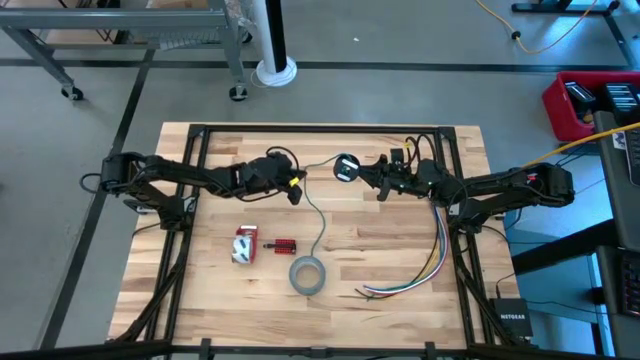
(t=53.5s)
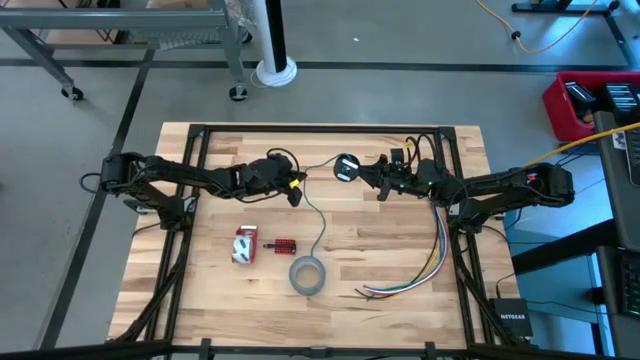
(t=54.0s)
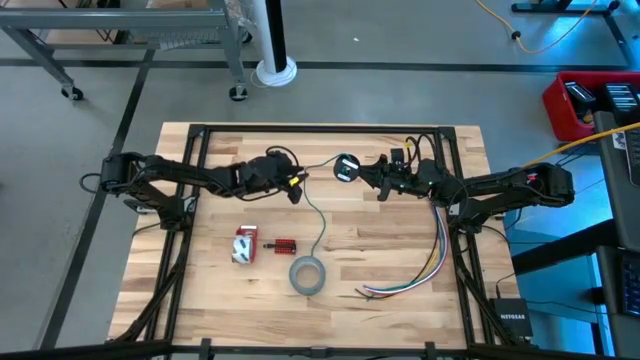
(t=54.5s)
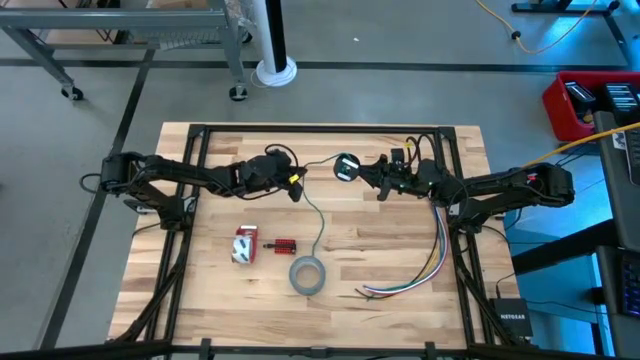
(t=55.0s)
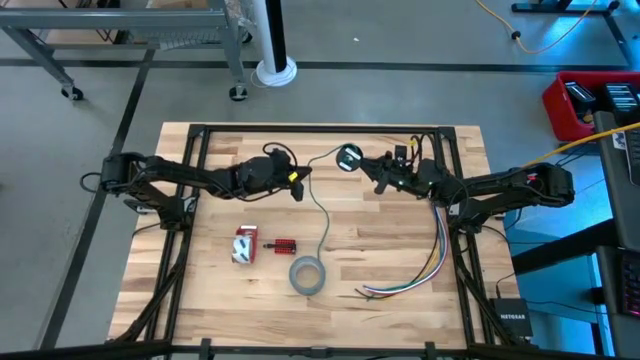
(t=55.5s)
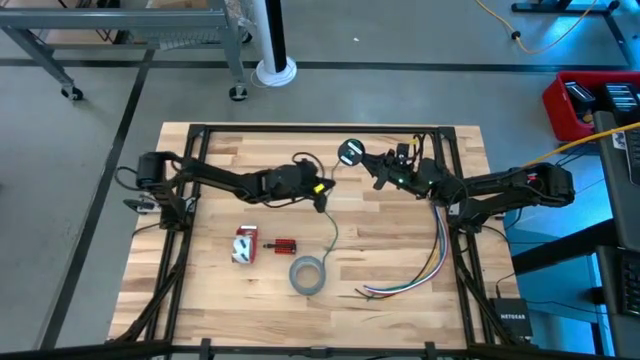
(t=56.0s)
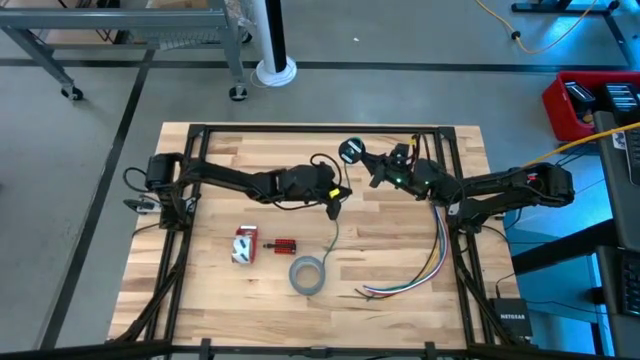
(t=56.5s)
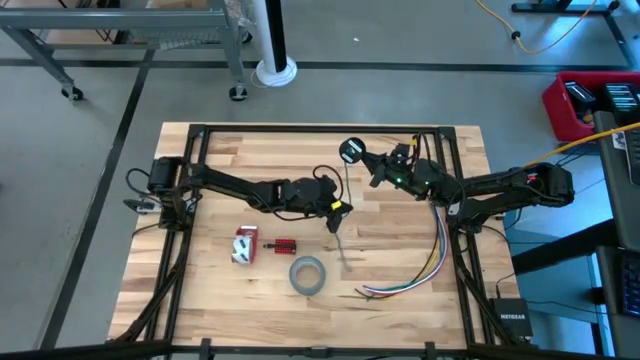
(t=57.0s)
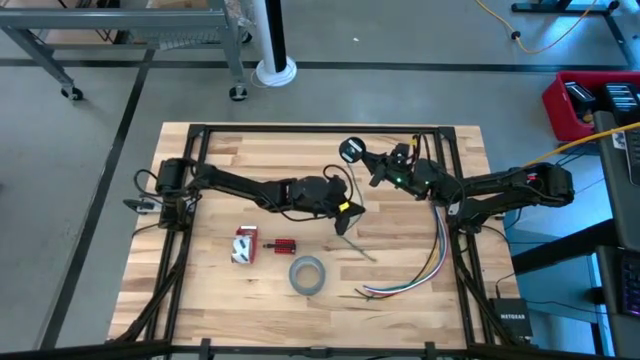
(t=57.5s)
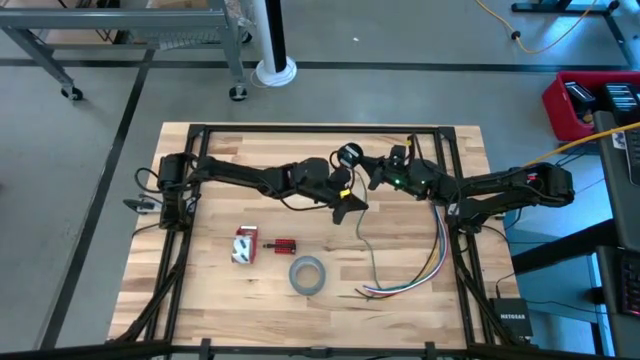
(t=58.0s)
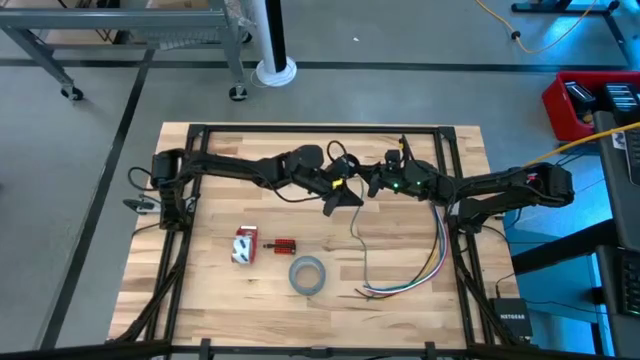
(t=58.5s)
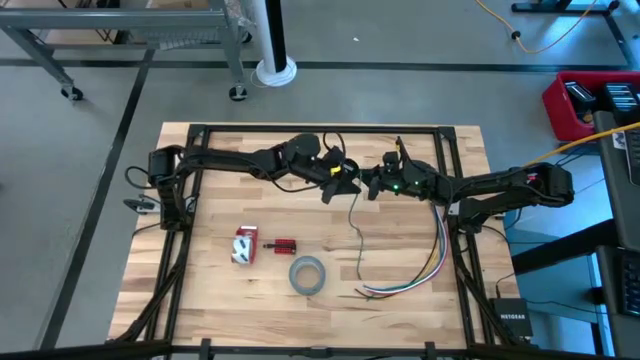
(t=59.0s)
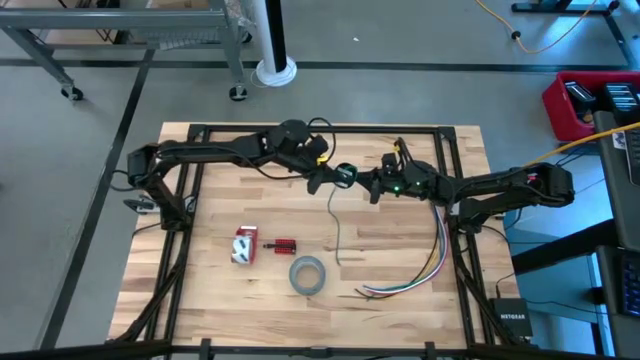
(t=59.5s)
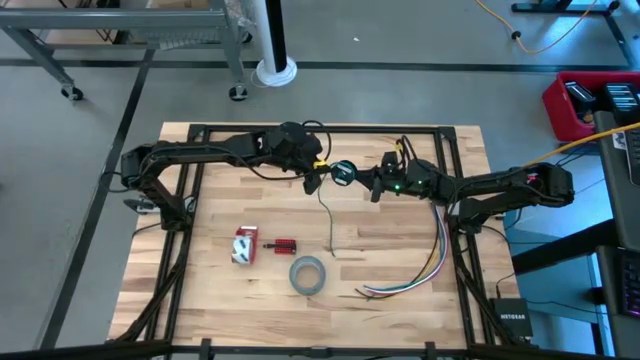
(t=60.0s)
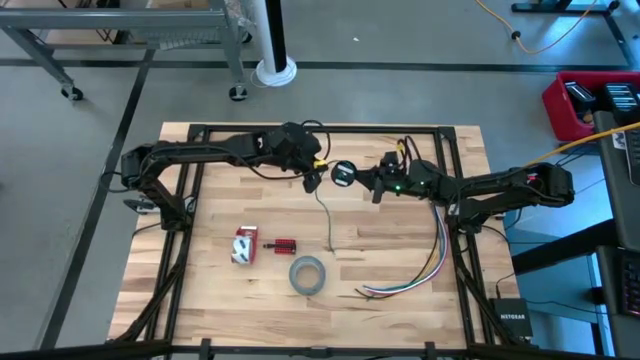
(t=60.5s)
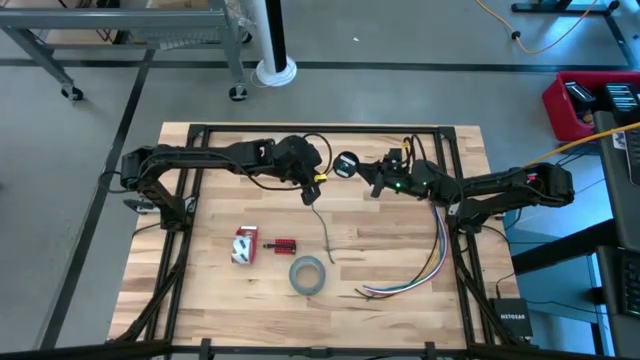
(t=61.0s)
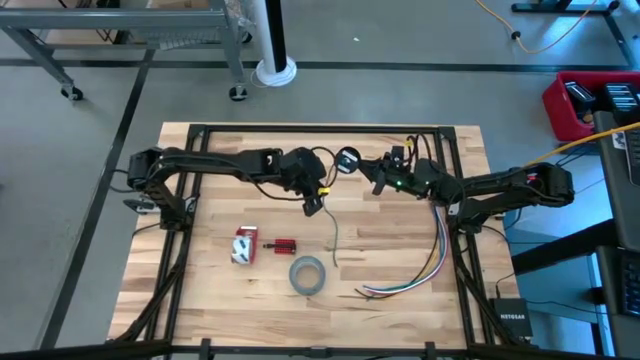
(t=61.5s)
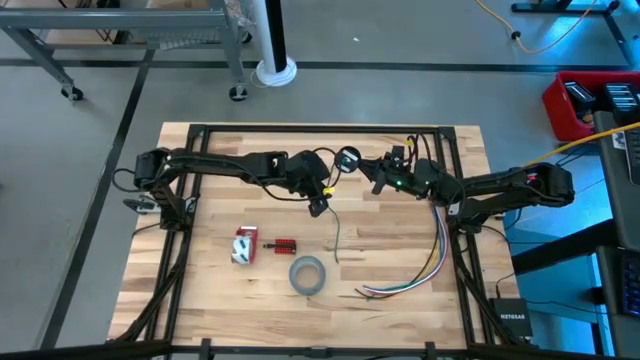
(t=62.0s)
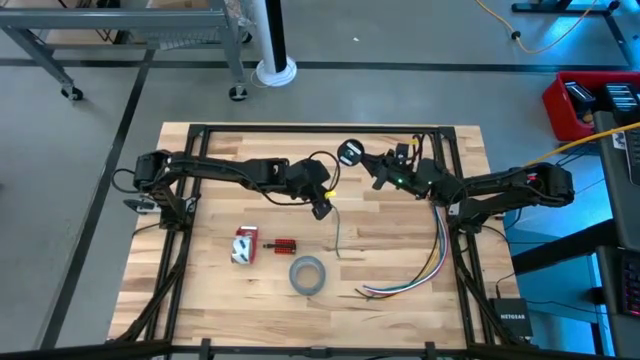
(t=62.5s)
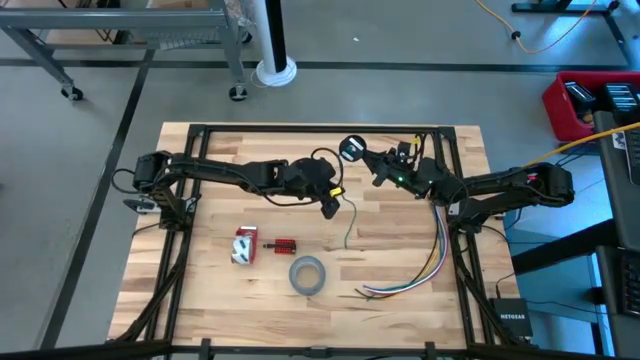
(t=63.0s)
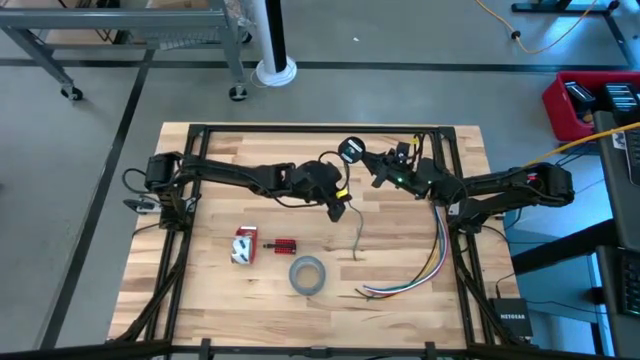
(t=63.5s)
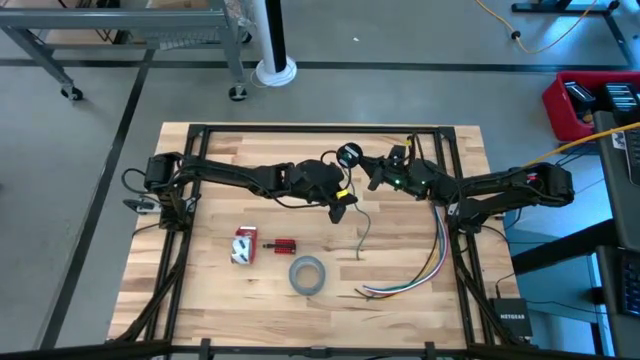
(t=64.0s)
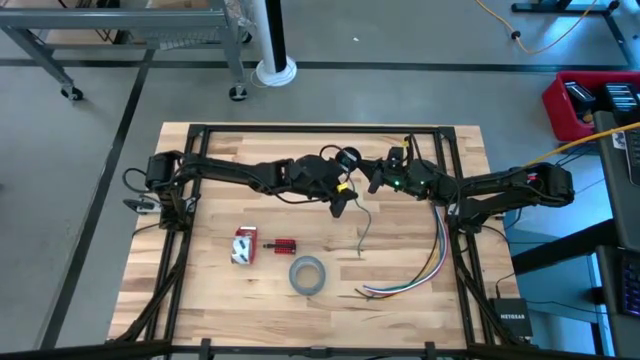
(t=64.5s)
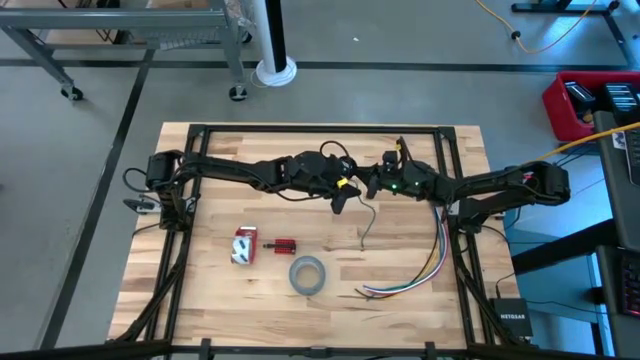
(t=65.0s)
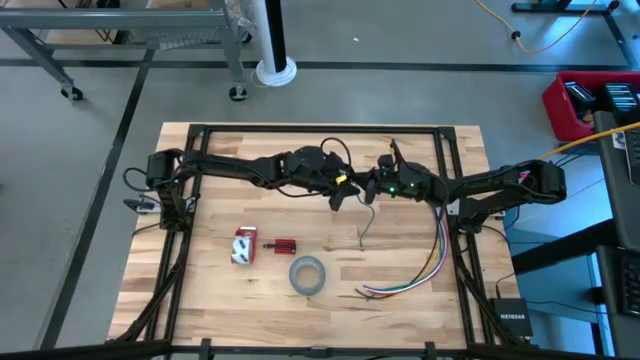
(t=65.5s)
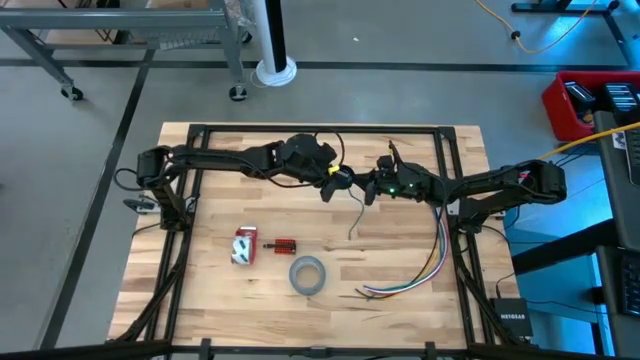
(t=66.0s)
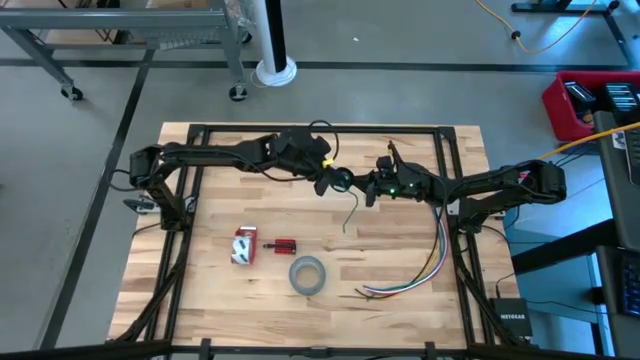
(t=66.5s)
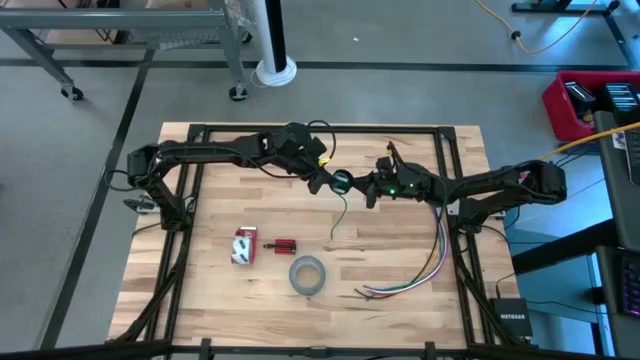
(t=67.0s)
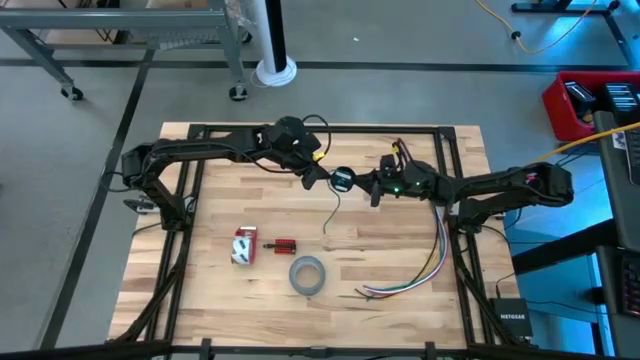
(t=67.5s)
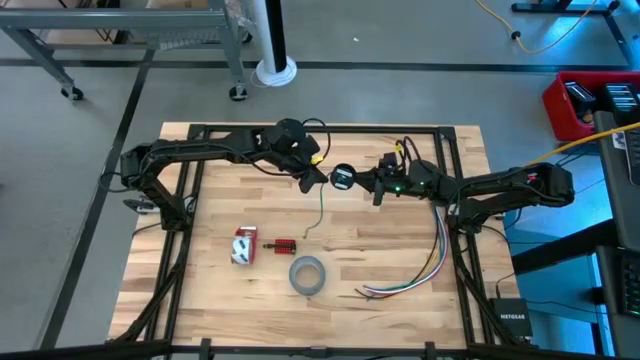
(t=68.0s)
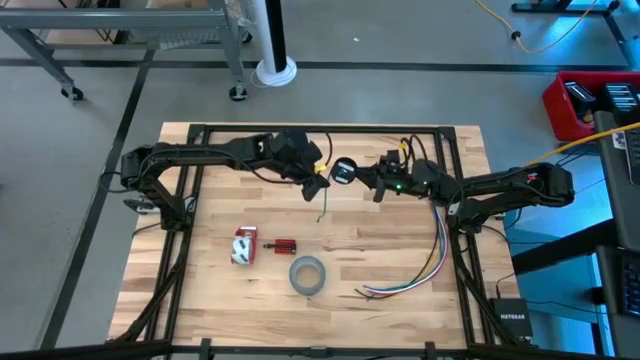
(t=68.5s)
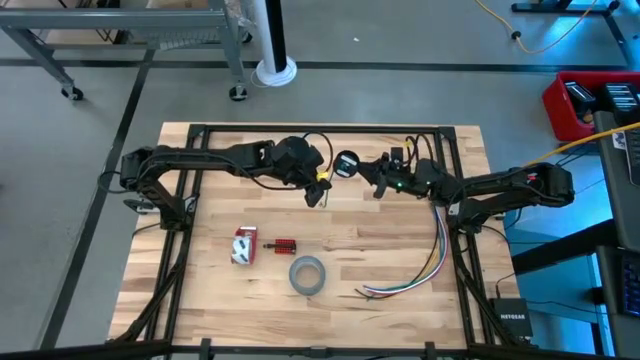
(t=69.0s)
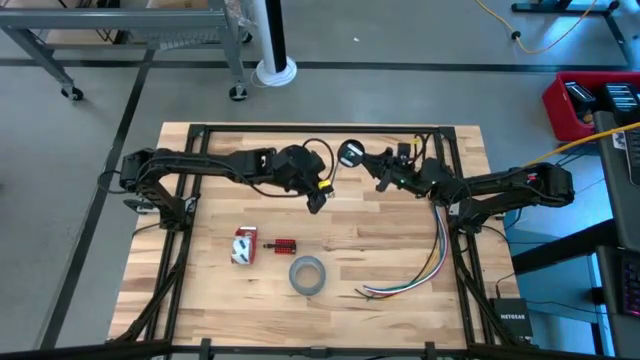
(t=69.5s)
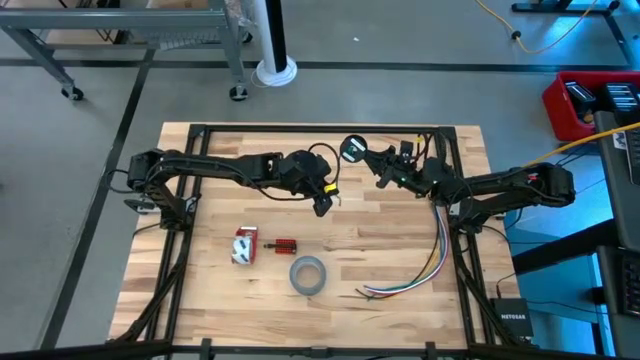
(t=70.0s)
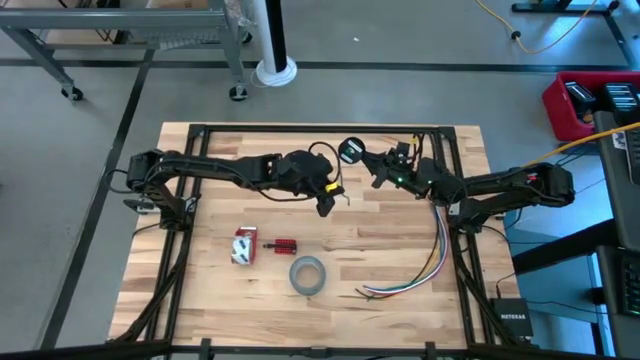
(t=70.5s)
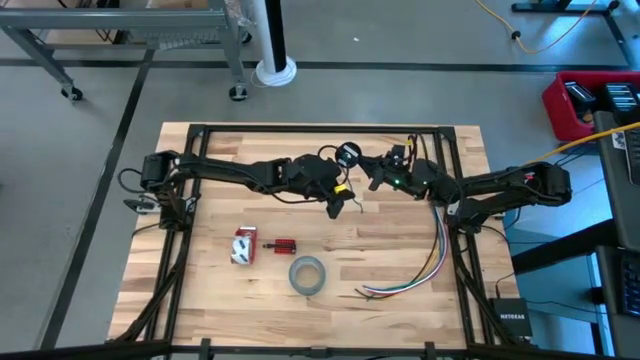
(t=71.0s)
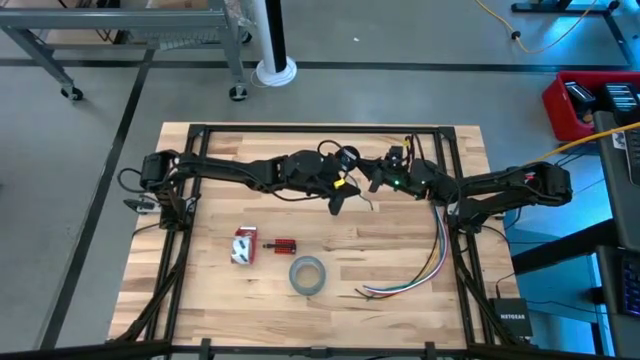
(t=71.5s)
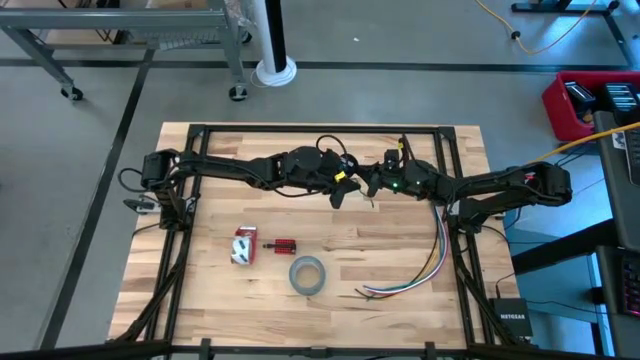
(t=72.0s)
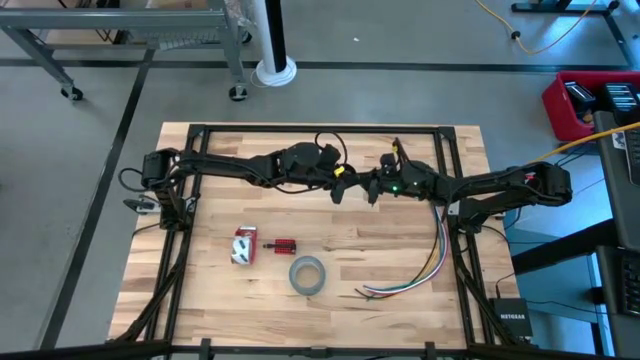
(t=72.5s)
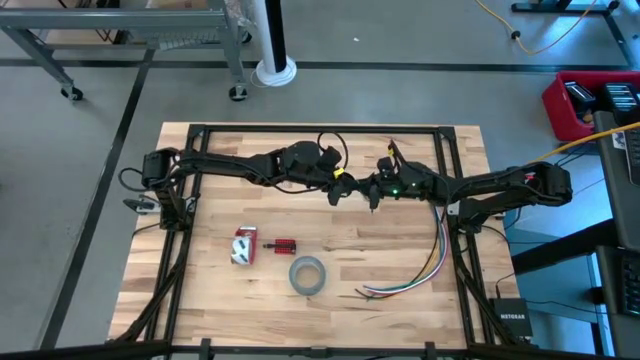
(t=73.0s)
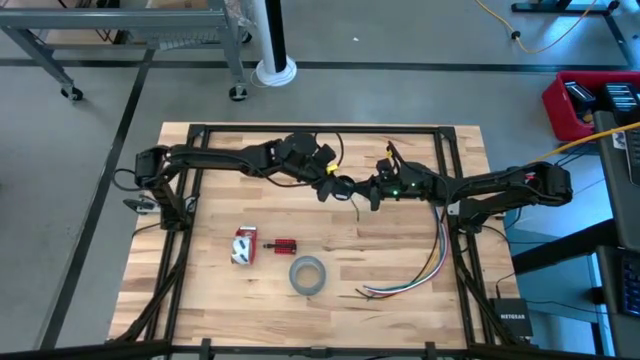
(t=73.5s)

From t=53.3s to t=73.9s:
Task: Coil cords
Coil the green wire onto the spool

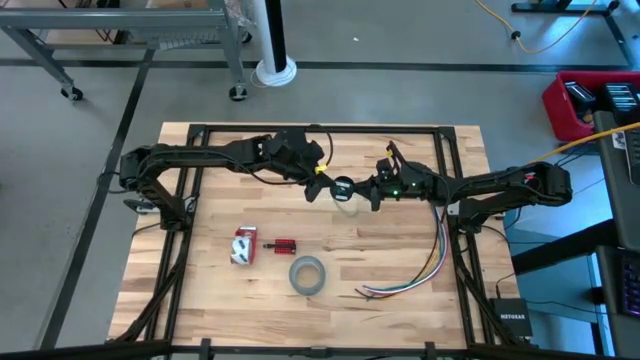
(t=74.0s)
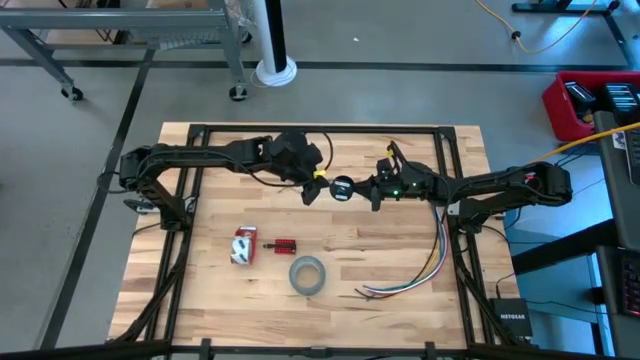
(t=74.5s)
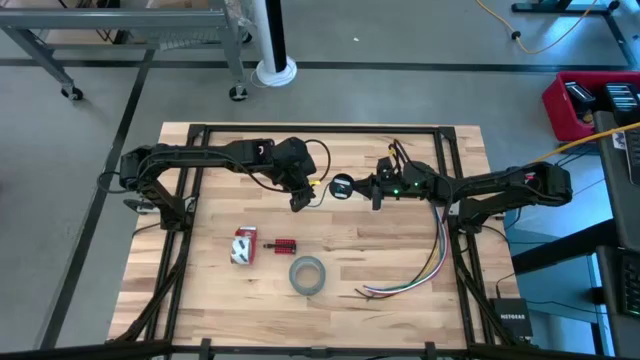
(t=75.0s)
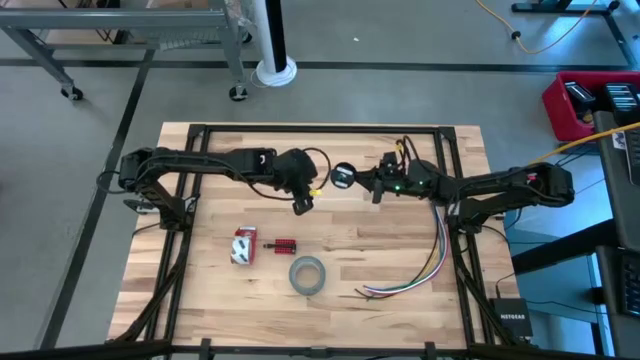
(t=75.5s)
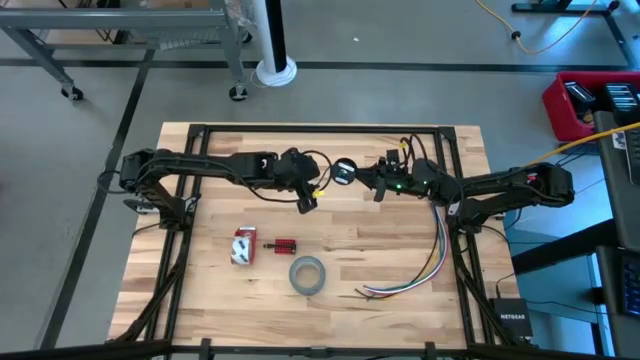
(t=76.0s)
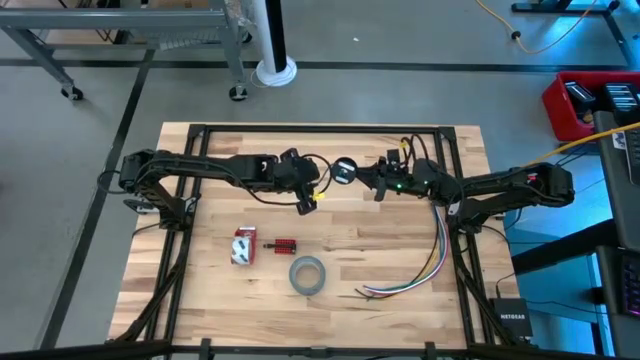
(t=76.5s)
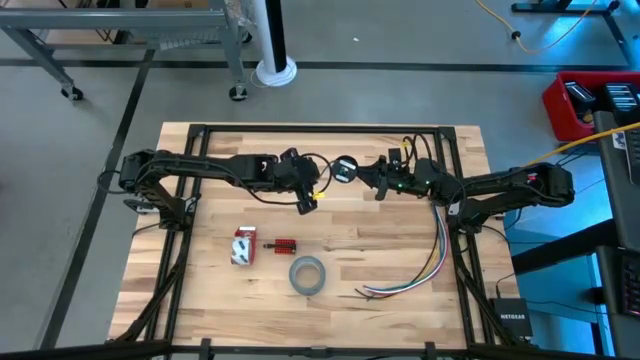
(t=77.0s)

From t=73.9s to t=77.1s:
Coil the green wire onto the spool
